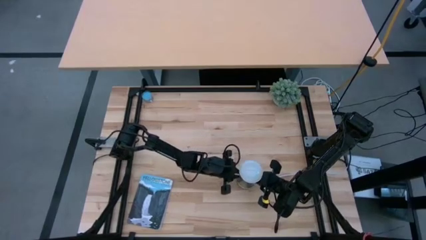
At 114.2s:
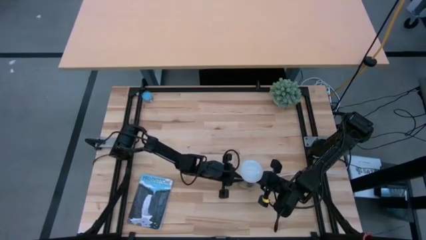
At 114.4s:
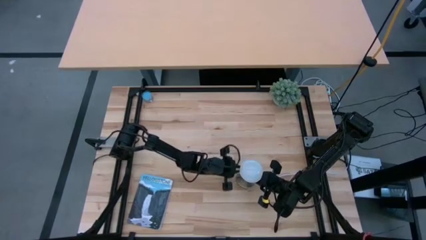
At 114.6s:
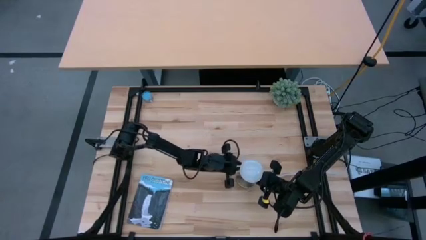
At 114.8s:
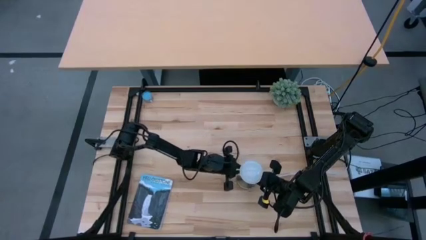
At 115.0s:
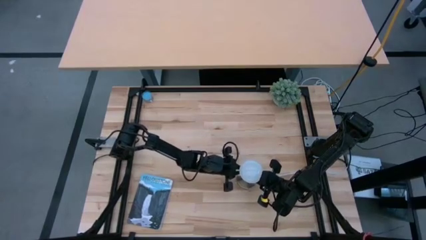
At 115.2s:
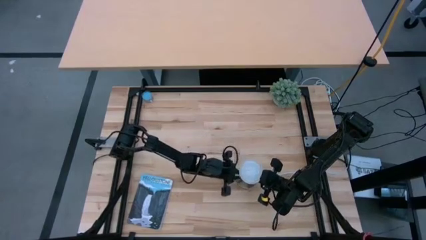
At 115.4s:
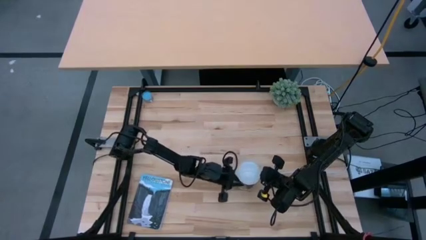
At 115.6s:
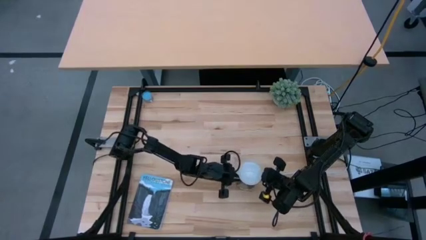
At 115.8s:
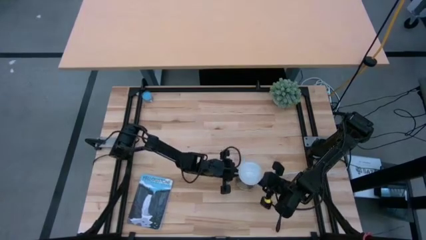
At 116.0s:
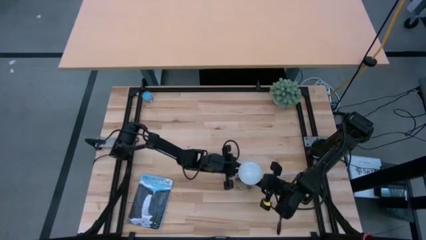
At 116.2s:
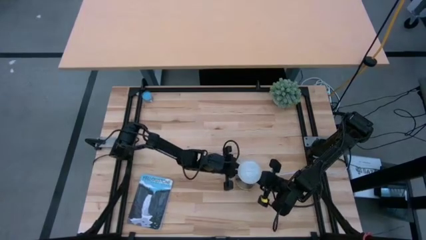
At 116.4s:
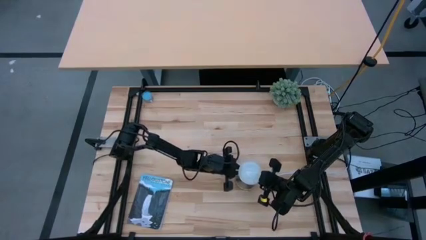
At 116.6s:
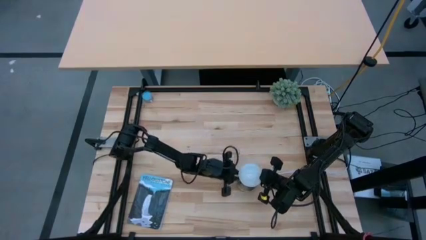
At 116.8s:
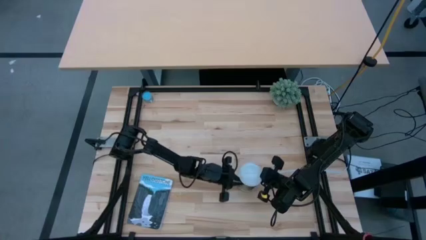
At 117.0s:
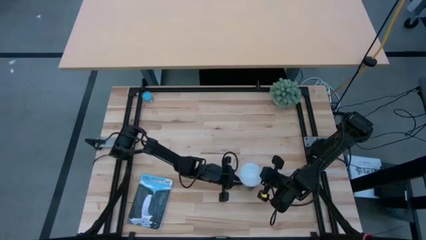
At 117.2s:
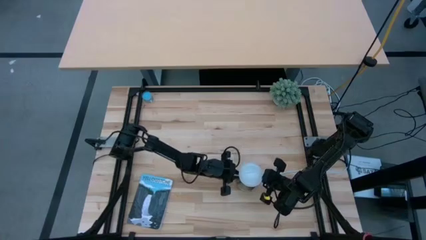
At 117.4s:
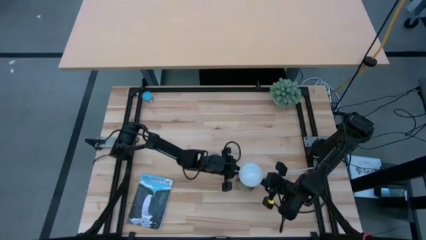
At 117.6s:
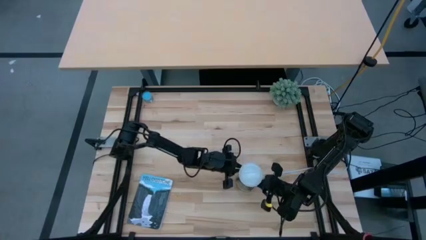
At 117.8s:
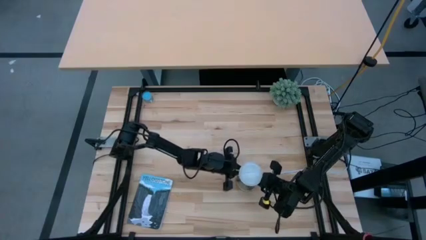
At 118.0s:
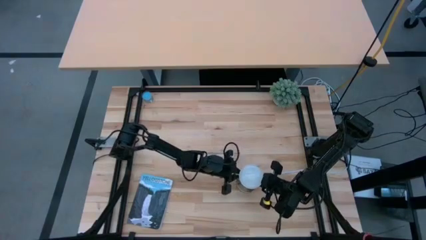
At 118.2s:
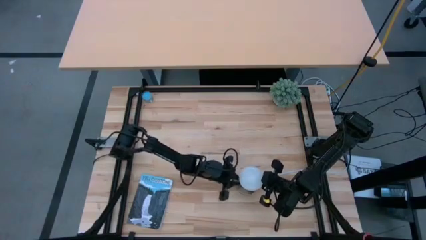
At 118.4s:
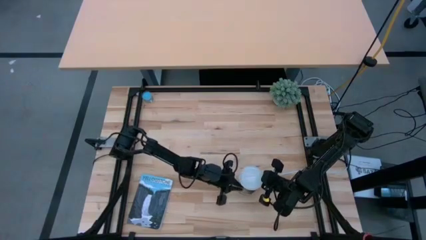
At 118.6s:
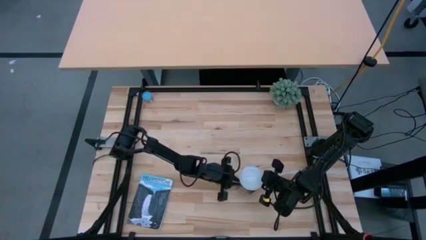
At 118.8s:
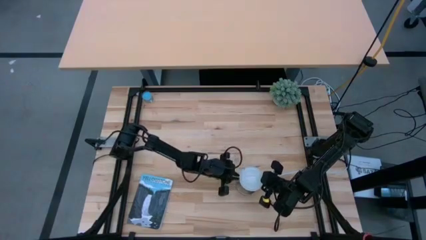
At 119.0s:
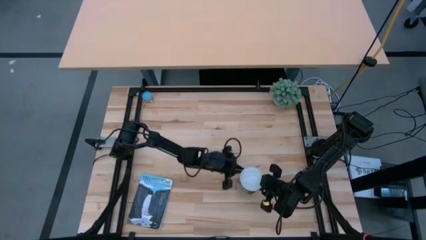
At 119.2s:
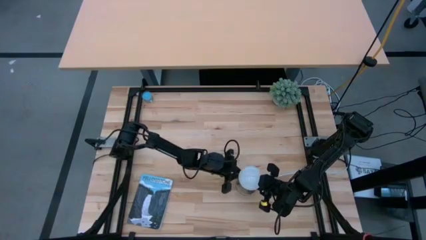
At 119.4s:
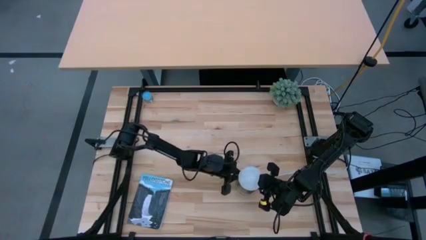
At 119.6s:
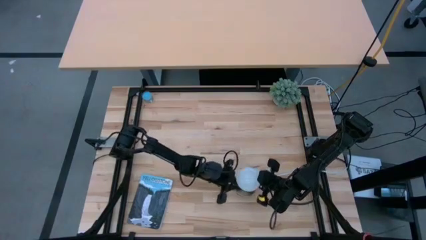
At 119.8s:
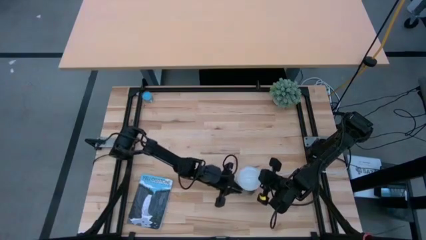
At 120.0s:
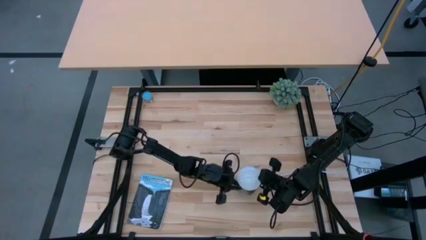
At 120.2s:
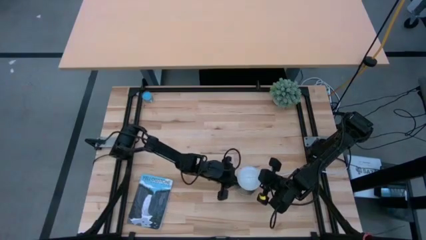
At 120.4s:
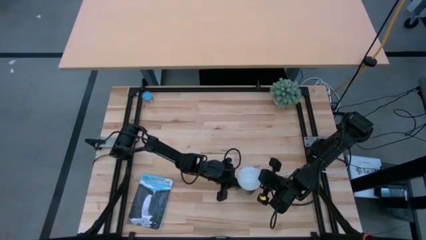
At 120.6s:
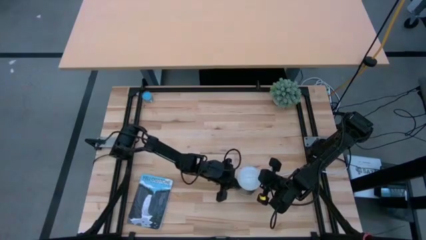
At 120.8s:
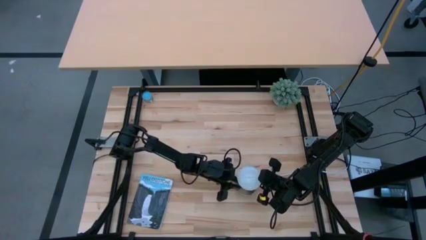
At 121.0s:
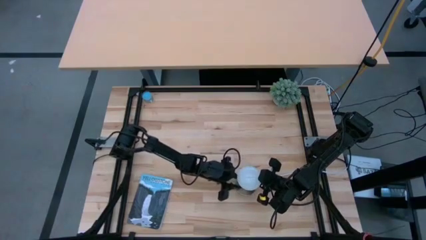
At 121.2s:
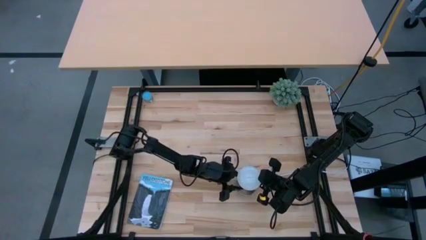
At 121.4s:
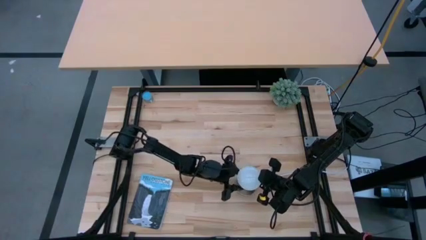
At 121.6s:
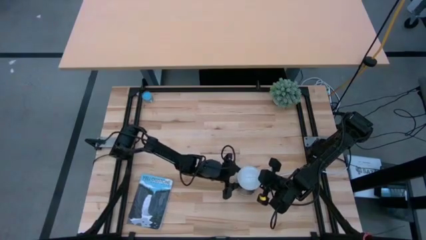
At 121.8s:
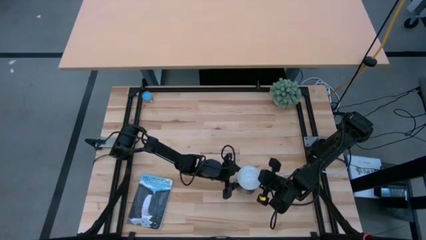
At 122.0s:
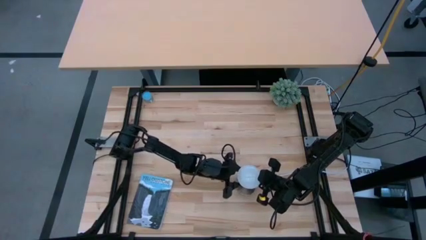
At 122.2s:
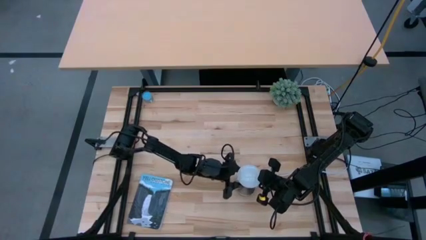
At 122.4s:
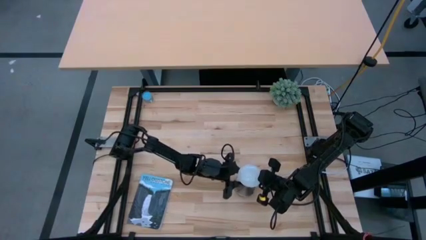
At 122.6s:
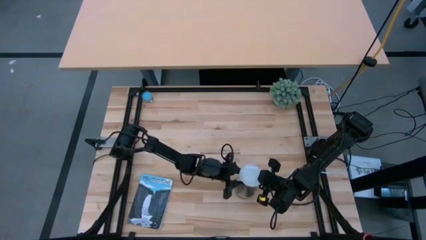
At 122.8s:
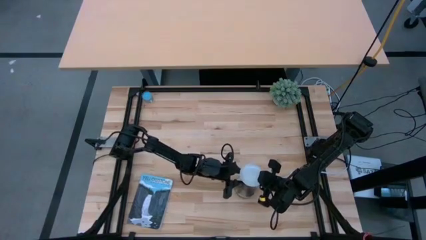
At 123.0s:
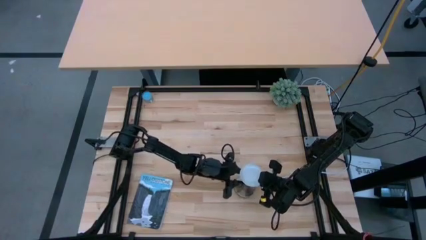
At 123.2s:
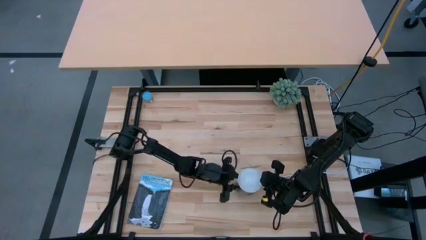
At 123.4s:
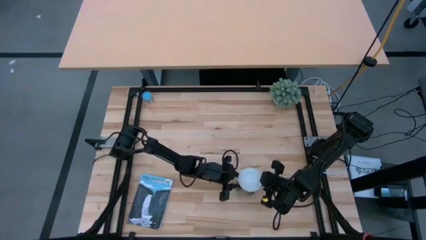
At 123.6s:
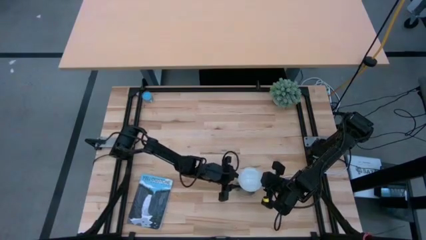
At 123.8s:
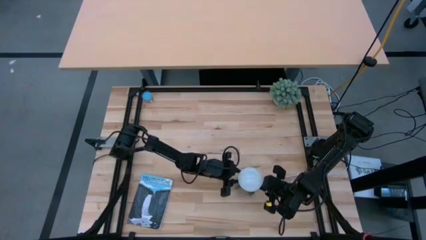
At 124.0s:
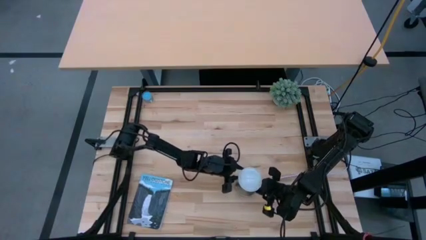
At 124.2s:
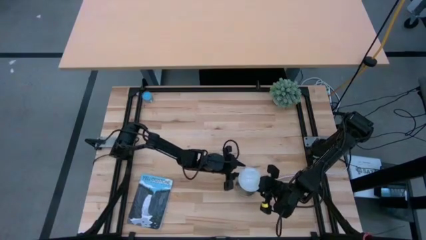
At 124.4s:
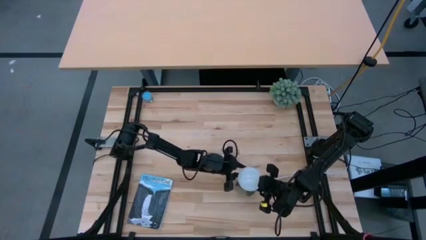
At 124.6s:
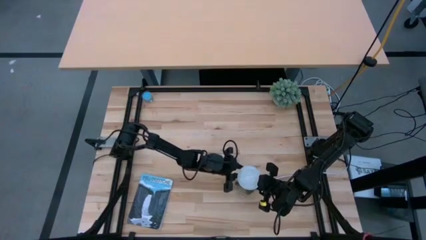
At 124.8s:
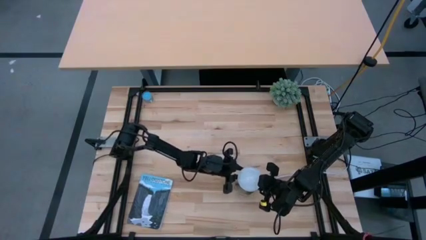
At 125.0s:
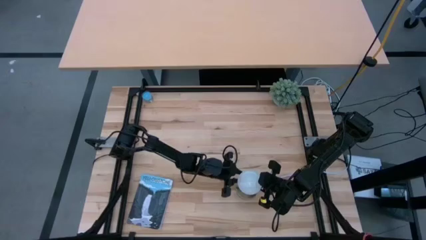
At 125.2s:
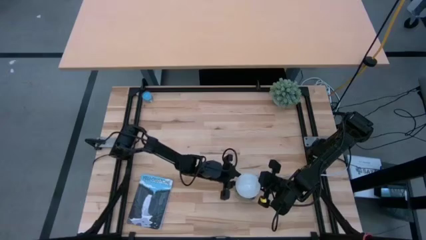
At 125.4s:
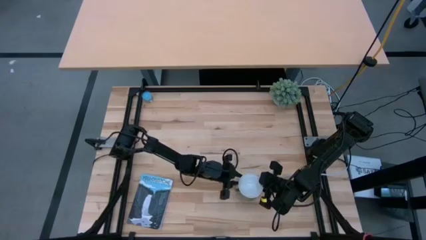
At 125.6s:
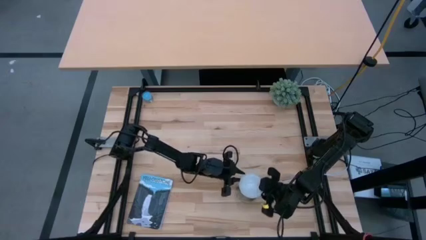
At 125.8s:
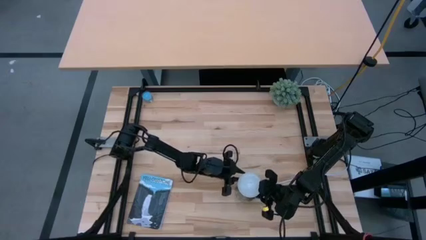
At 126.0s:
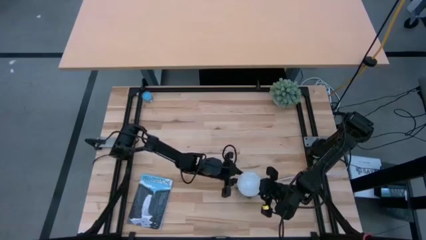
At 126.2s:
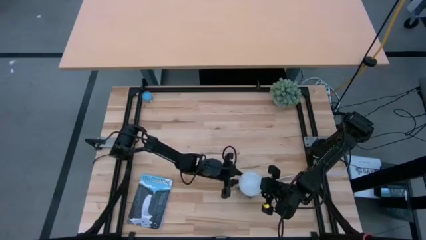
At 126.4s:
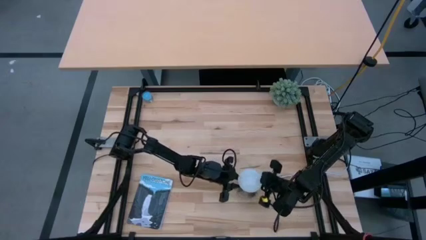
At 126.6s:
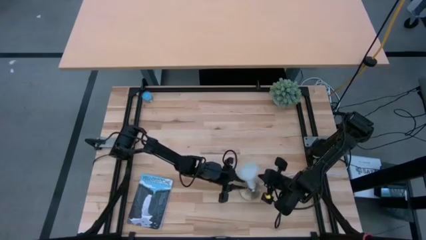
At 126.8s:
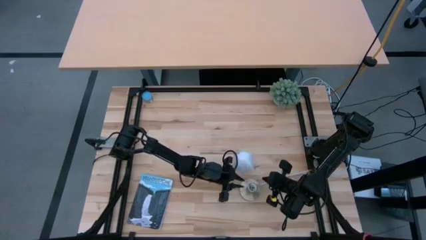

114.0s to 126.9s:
Task: Screw lightbulb
Remove the lightbulb from the bronze lamp socket

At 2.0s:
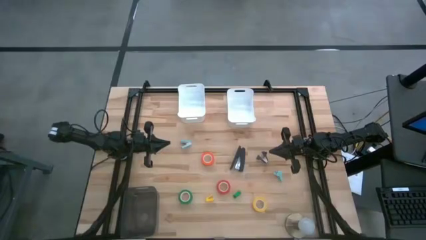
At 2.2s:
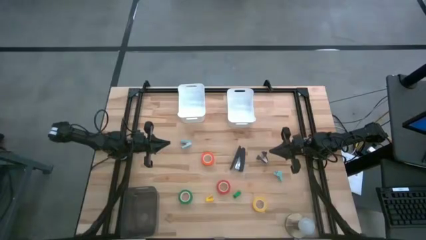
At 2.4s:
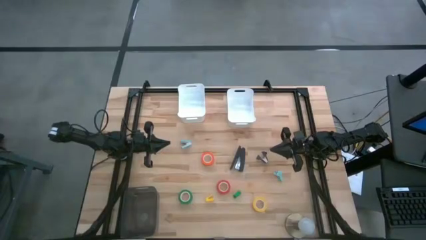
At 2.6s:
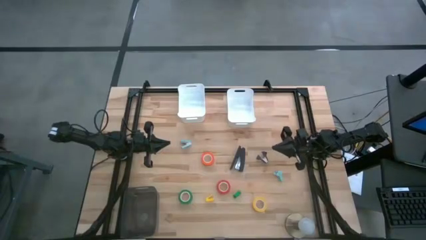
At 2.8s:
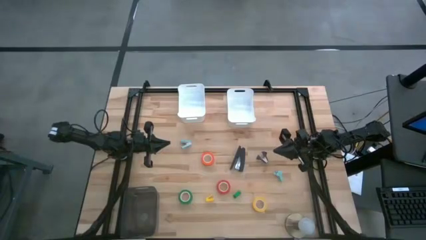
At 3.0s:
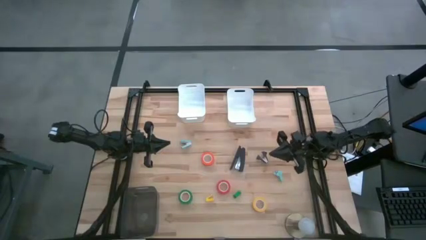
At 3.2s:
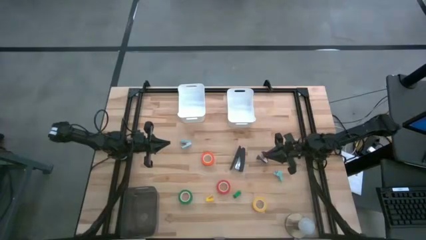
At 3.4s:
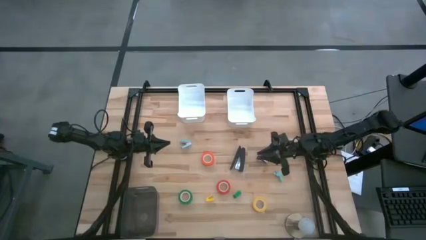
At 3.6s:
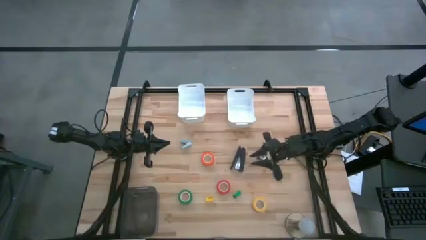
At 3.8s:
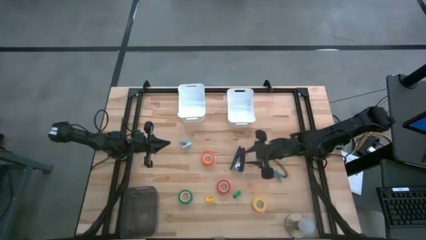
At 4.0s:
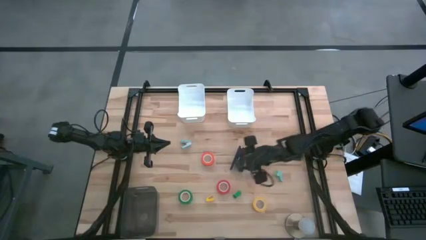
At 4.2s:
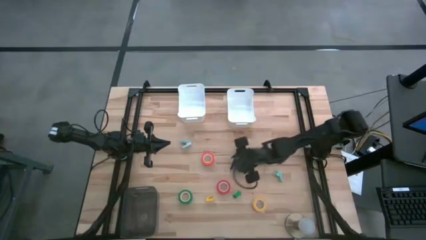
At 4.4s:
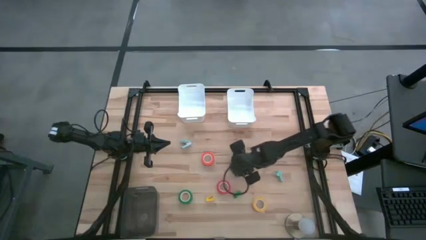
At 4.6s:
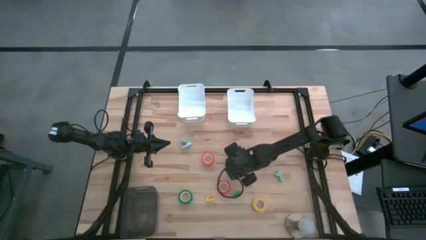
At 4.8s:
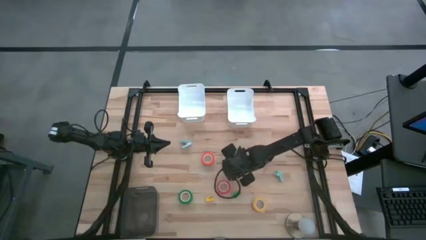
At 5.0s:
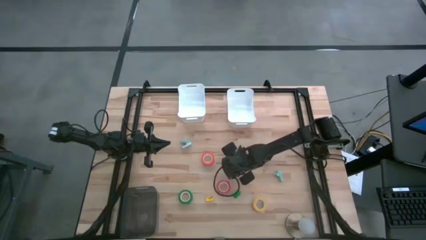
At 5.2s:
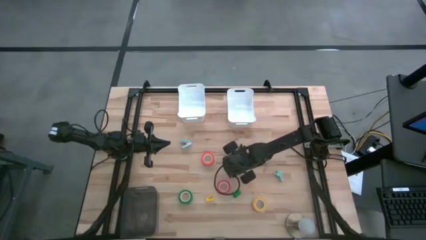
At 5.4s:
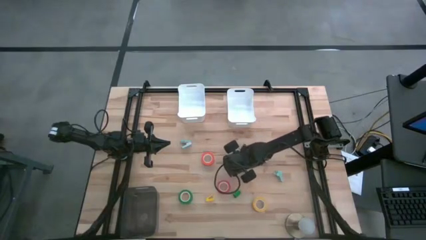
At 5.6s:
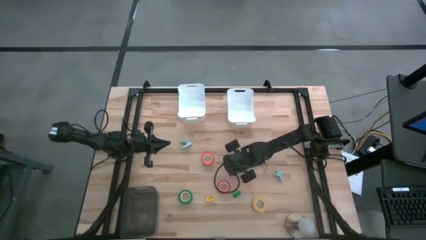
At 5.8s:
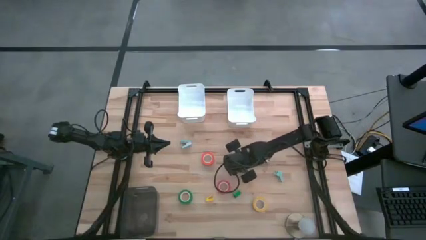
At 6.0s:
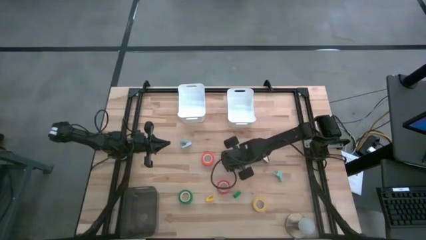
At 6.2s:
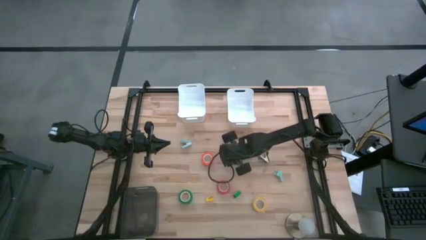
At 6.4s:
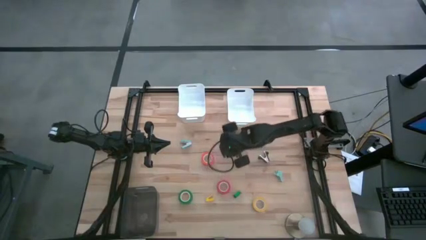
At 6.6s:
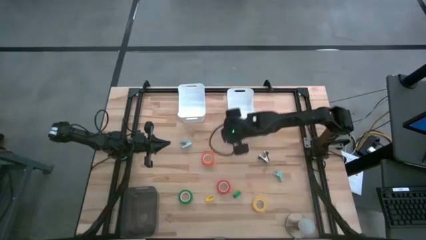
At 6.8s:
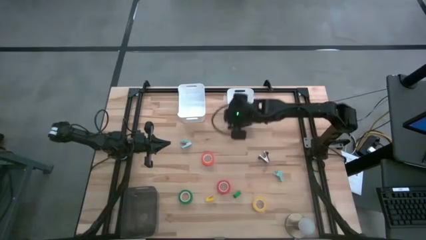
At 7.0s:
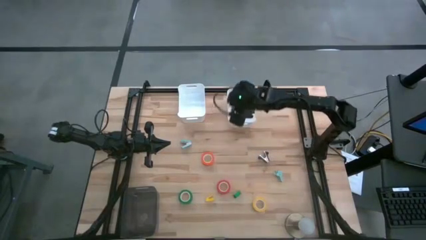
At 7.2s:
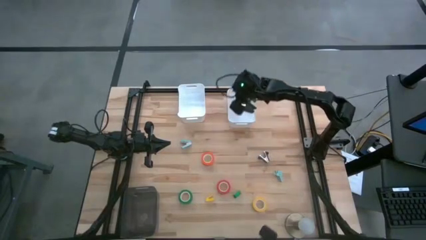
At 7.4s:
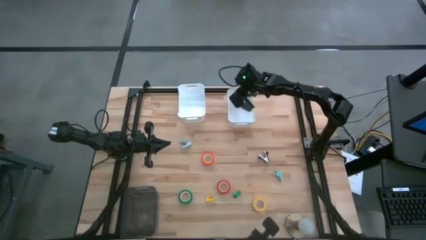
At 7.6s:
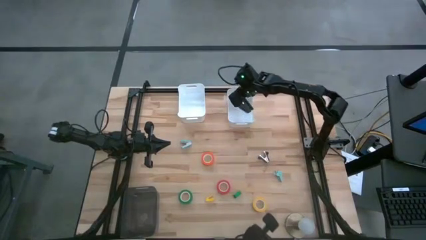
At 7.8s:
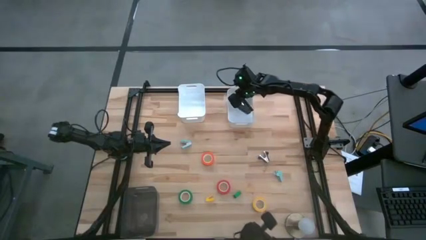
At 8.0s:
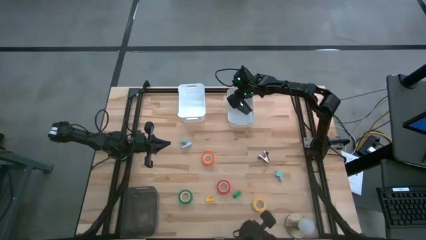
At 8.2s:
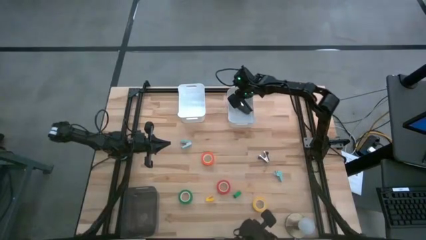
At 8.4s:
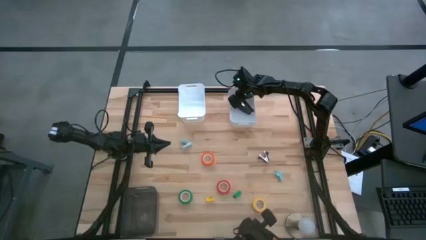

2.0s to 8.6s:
Task: Pick and place Stapler, Stapler remover, tape
Put the black stapler into the right white bin
